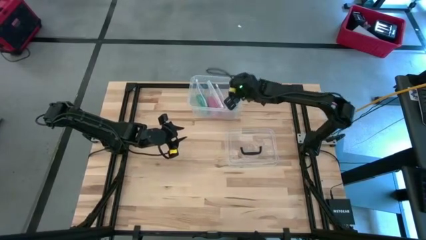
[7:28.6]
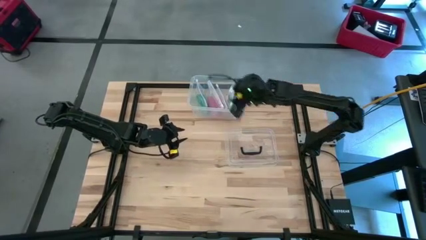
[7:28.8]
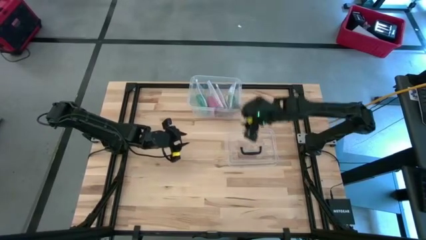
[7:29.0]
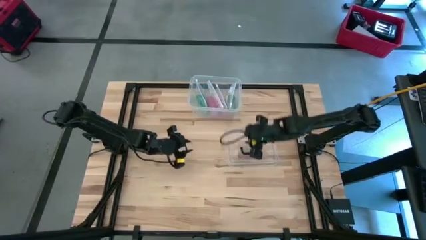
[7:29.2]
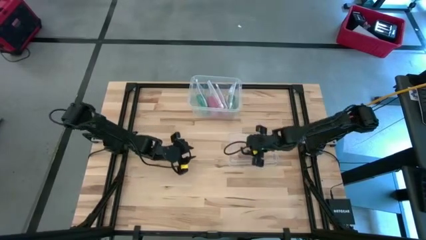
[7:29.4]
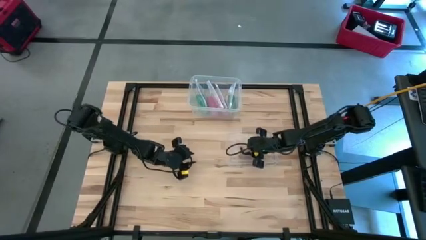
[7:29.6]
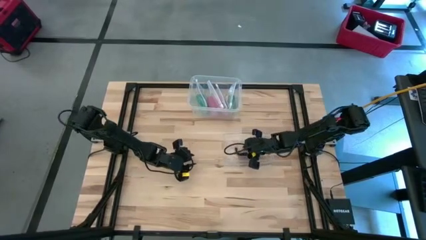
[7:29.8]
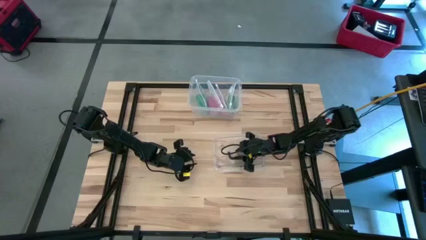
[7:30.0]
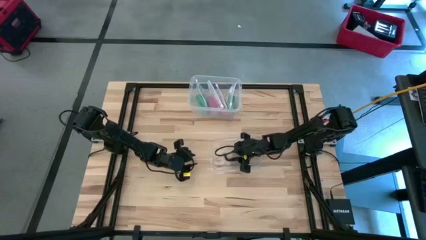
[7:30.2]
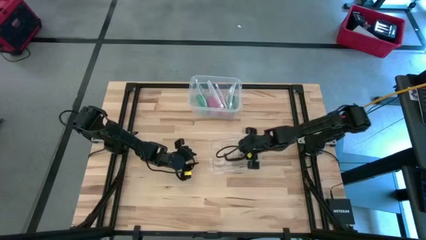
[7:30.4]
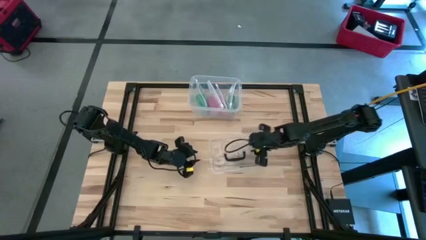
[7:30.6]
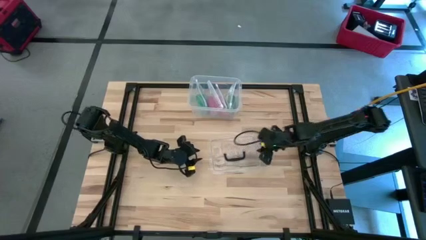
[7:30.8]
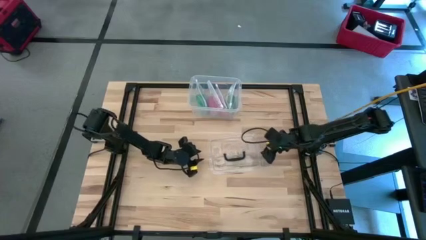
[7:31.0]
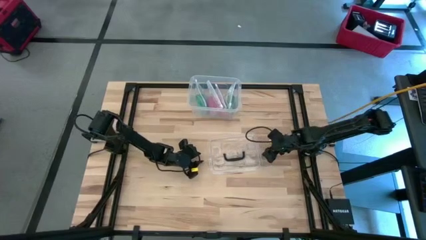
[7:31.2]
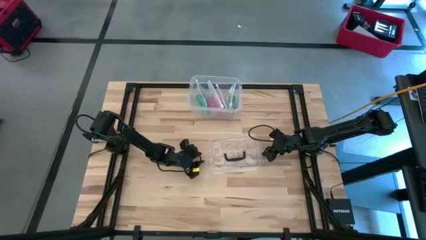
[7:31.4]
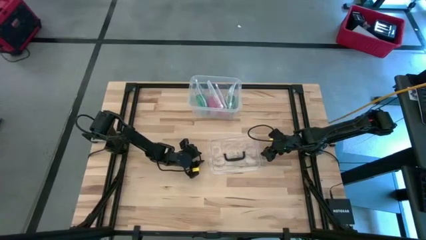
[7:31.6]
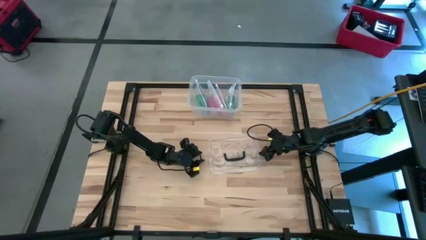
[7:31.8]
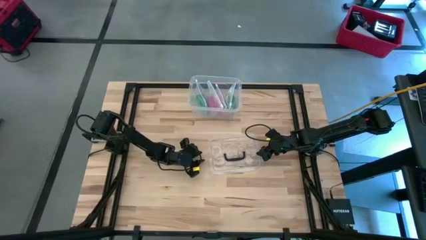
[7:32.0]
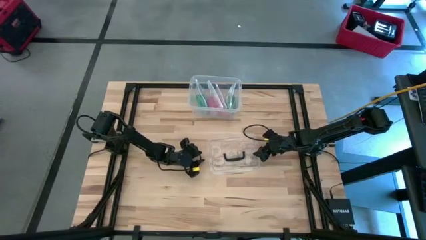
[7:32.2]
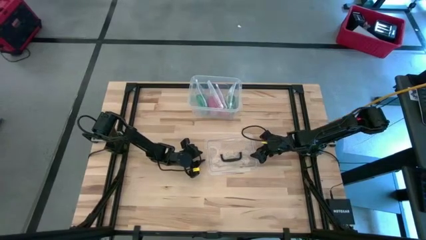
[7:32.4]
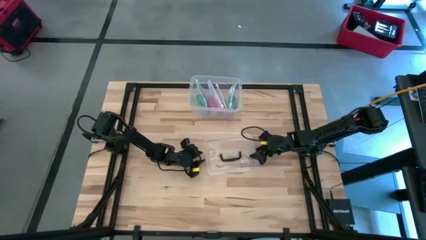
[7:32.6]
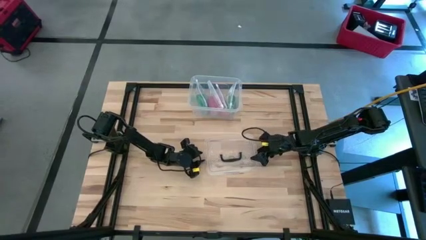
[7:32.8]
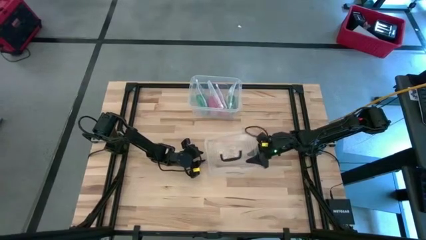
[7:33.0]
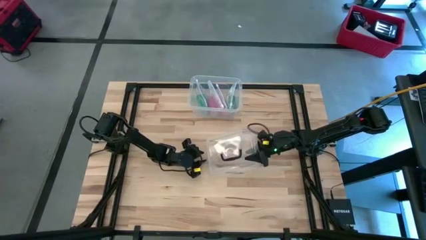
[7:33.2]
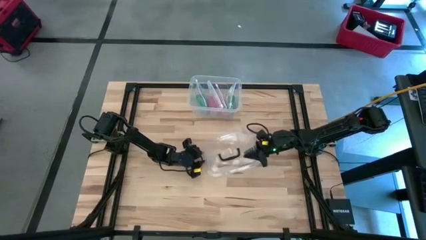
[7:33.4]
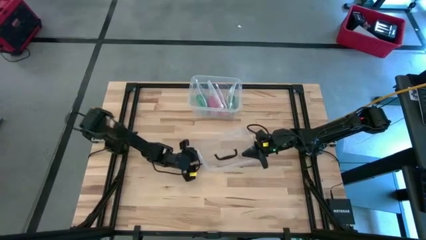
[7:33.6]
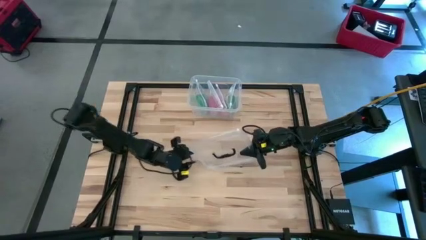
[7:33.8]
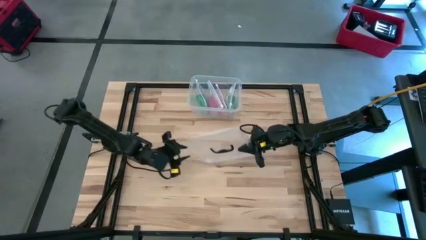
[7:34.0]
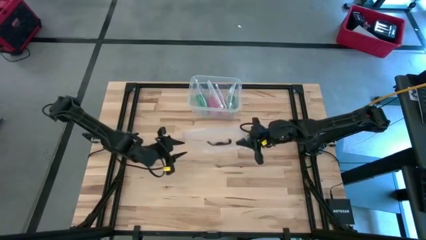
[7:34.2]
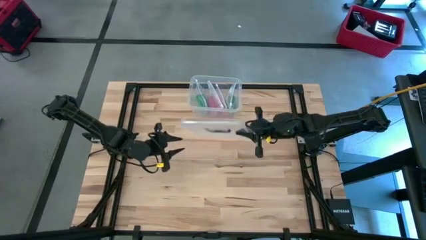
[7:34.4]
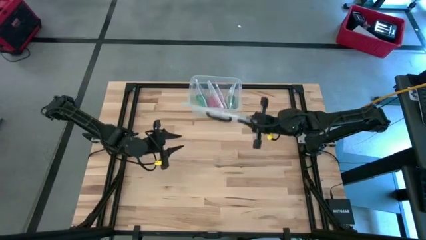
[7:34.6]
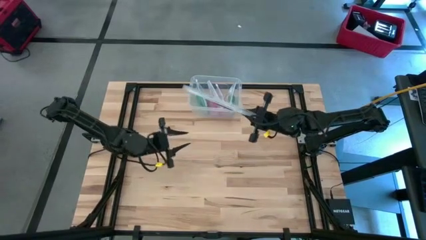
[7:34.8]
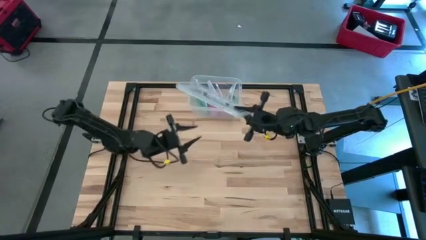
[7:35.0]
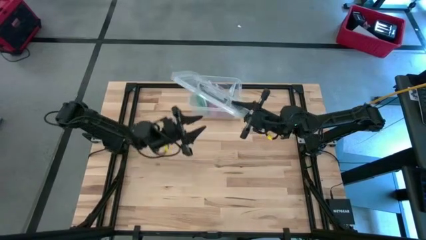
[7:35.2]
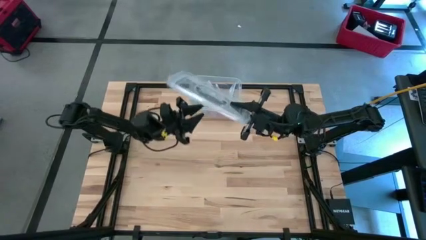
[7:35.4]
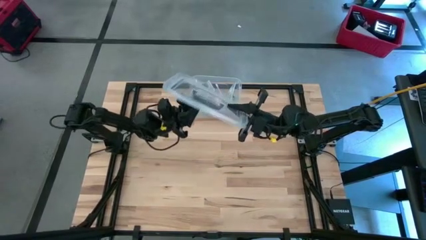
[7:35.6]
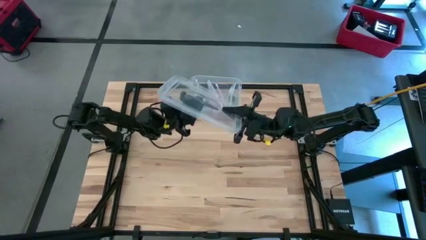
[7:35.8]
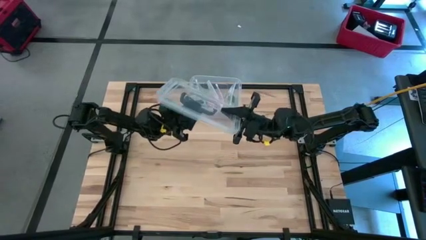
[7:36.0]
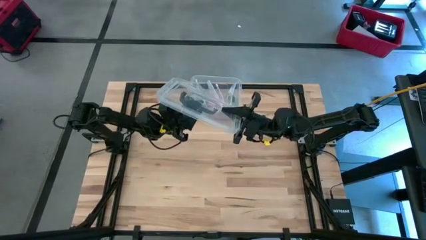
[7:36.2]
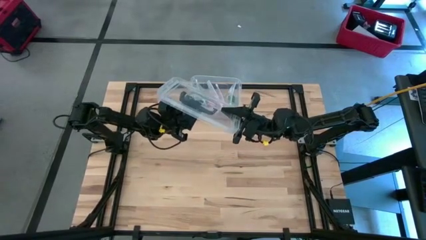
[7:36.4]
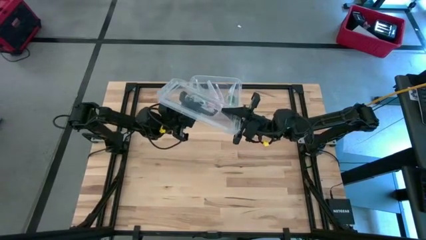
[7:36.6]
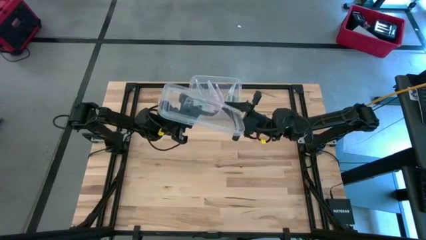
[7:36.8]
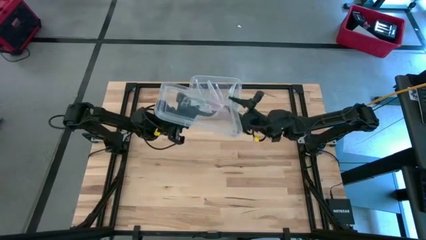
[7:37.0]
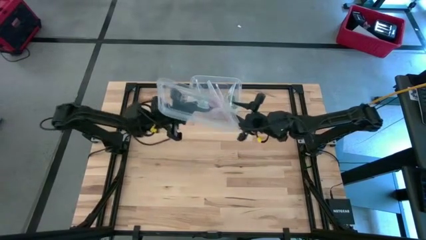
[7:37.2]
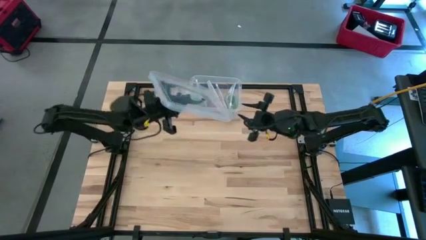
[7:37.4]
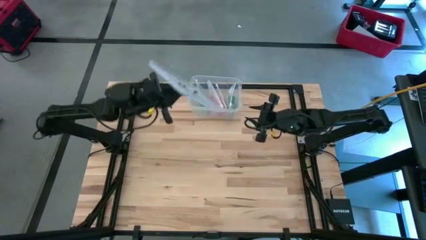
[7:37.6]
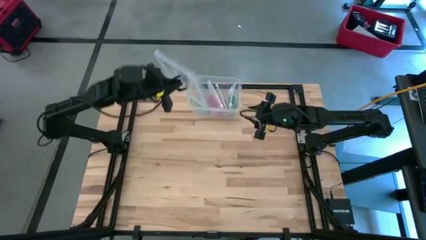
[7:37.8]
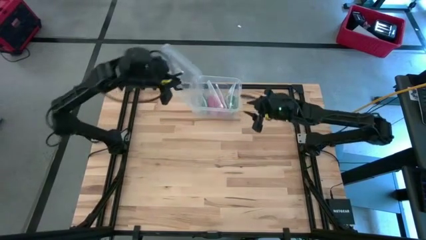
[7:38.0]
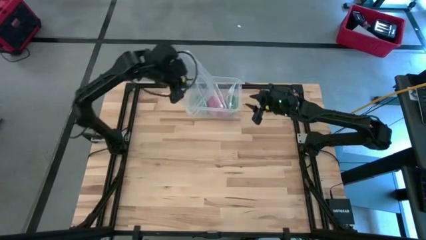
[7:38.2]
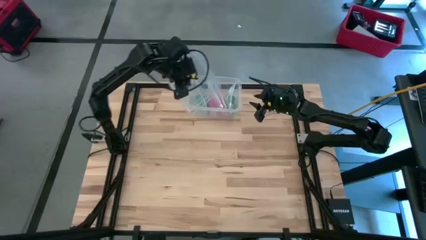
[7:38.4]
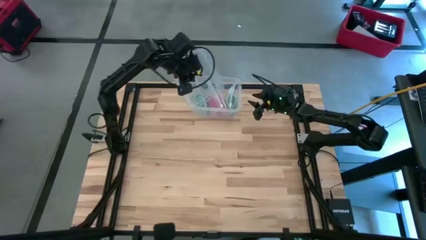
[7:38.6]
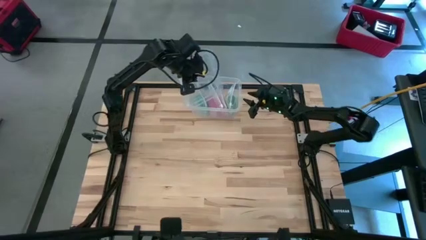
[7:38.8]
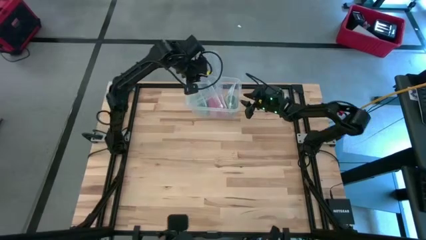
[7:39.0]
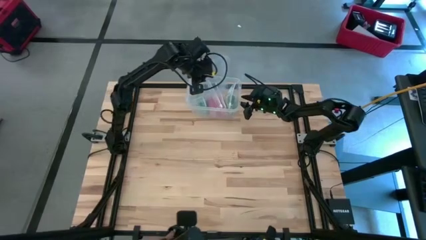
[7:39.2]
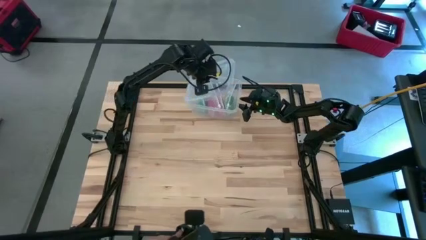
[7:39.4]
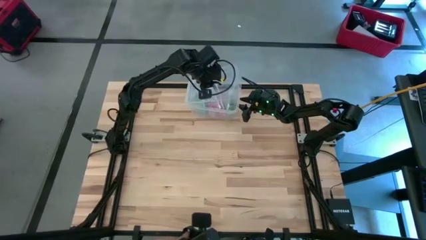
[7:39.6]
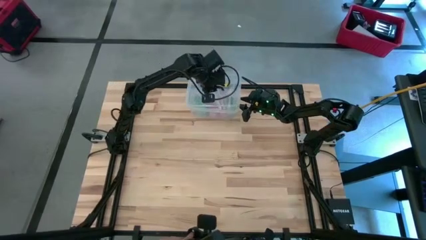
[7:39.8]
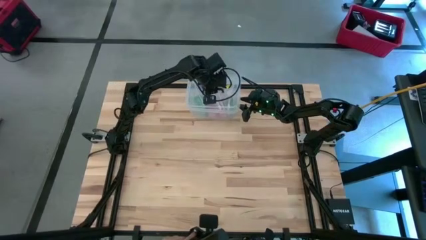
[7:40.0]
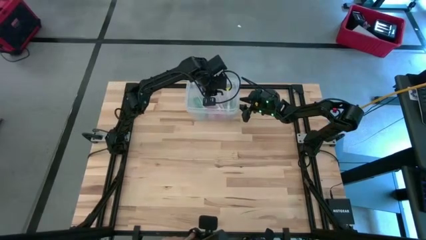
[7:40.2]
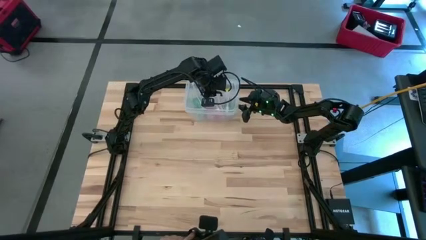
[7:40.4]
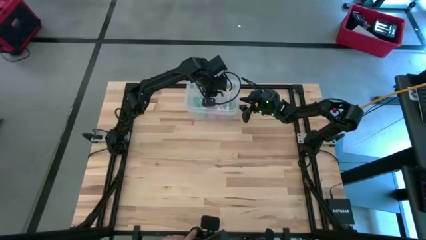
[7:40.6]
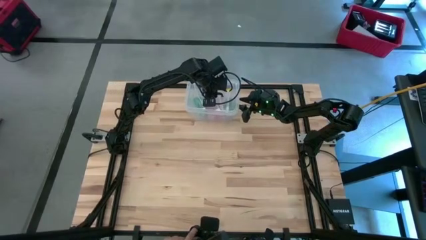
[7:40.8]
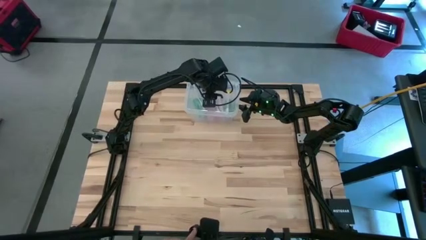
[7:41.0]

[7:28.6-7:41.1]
Task: Roll bandage
Close the transparent bin

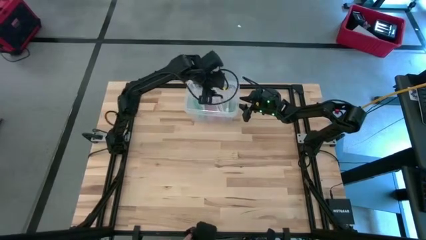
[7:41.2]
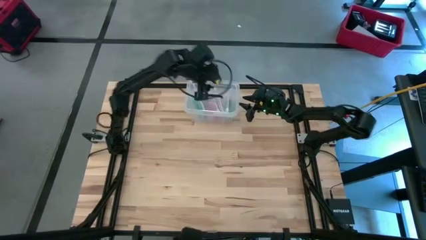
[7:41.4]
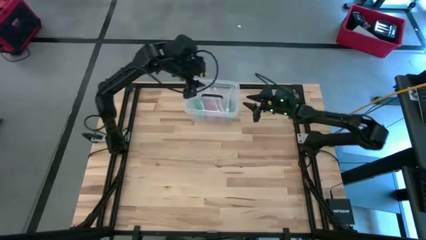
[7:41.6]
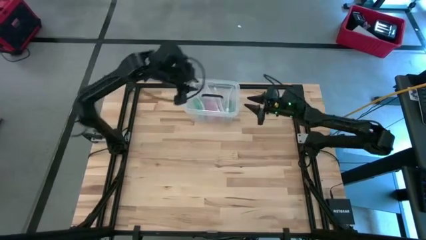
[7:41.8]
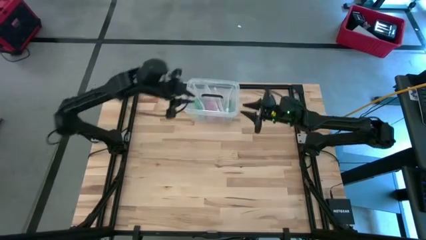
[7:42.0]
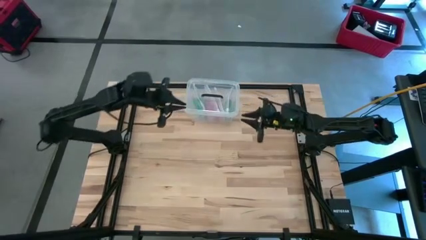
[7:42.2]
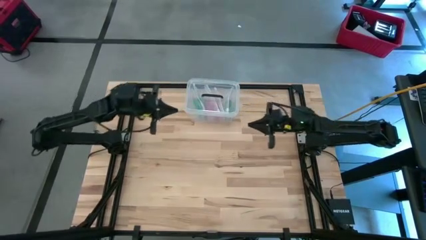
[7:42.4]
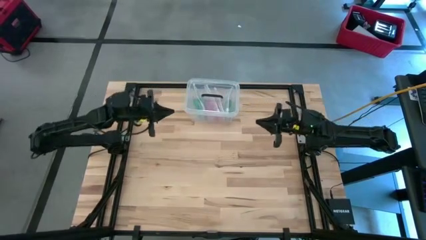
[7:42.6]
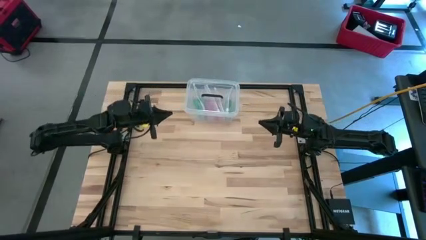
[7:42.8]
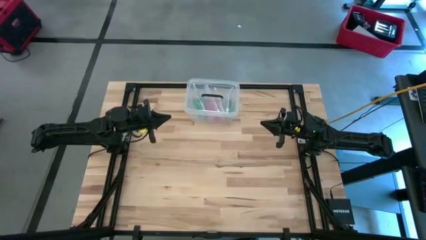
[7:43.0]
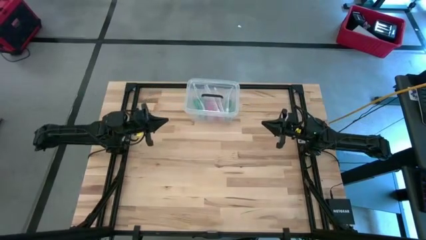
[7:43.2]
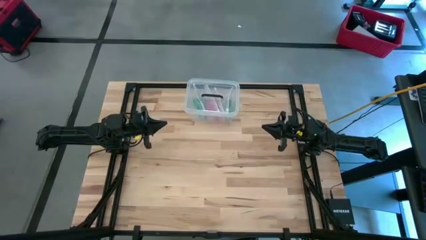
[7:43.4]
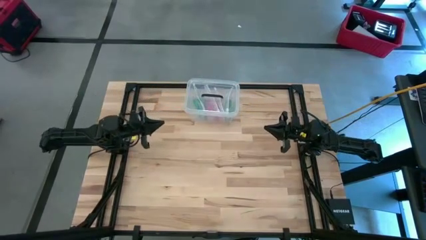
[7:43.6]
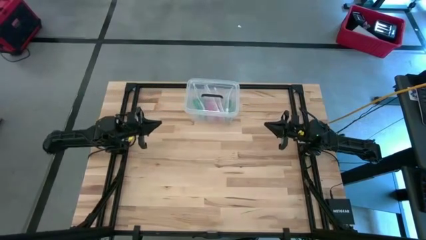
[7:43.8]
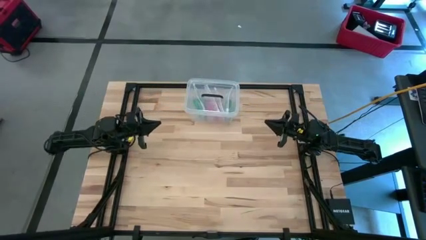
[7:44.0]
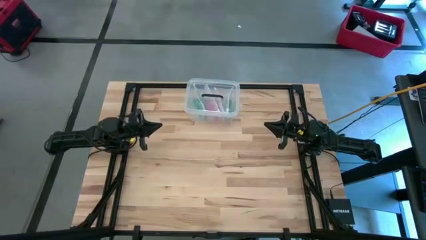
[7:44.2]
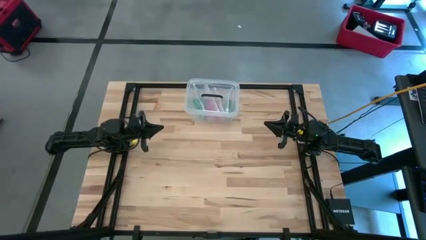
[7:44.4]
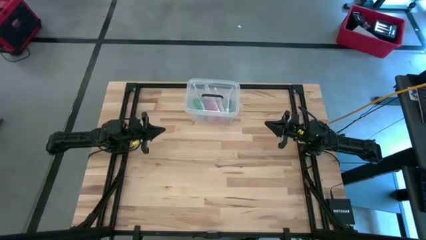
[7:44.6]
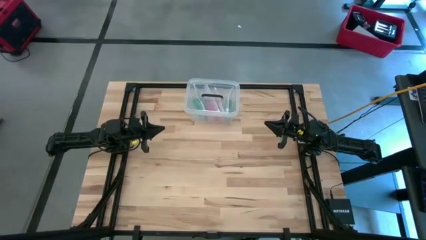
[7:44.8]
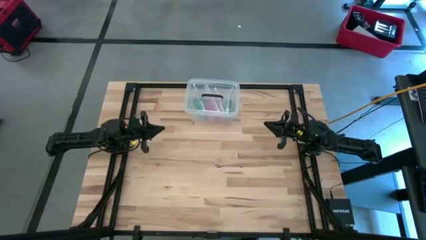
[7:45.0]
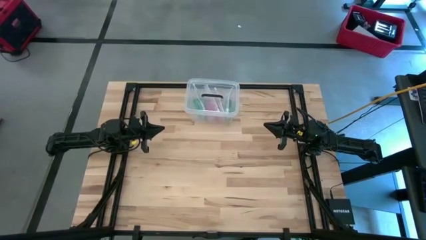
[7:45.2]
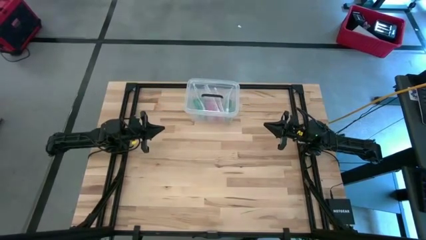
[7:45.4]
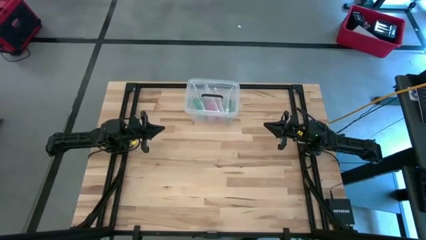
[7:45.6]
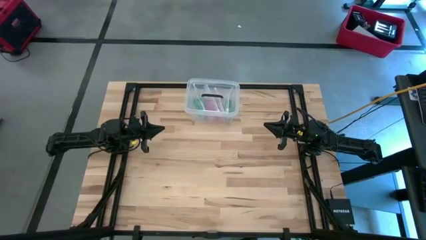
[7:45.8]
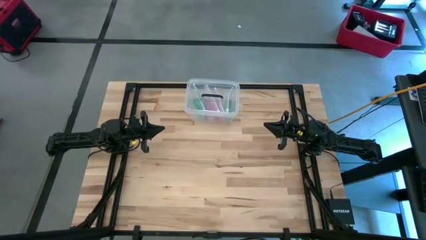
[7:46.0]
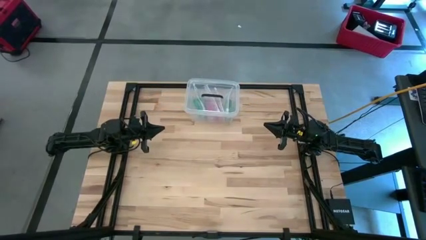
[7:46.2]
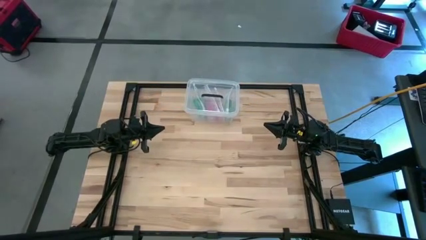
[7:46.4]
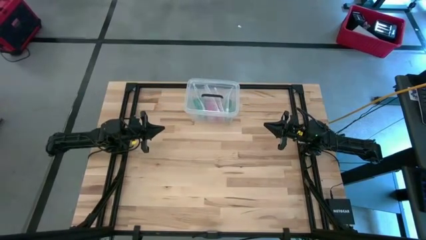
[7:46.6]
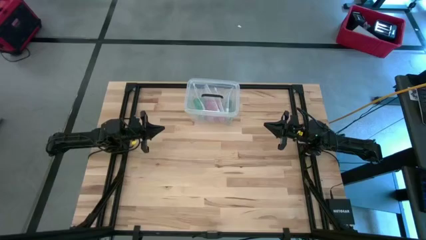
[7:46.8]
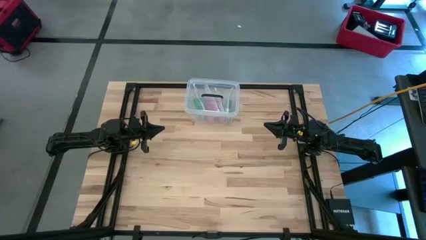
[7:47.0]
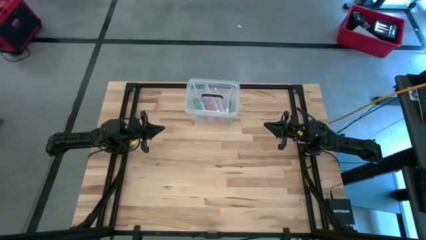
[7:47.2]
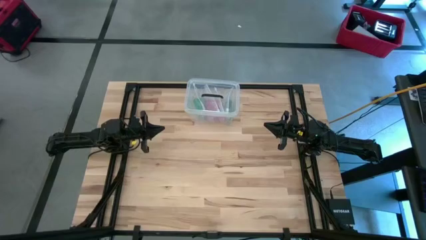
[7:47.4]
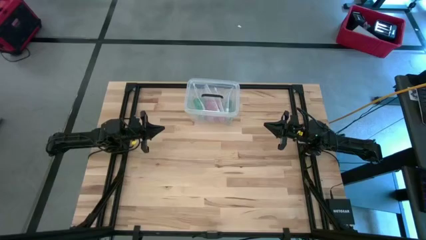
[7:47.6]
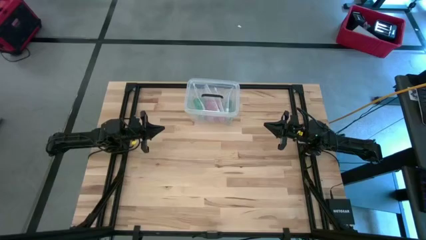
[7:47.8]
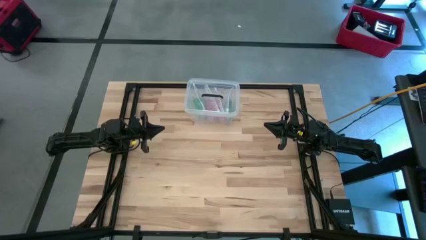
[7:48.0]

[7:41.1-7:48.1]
Return to Home Position
